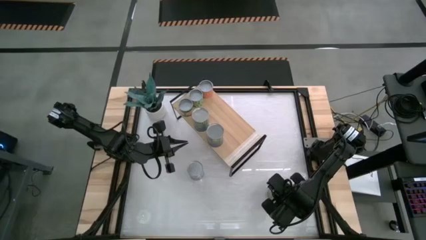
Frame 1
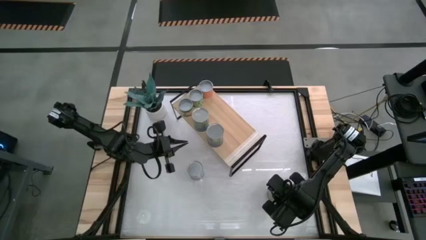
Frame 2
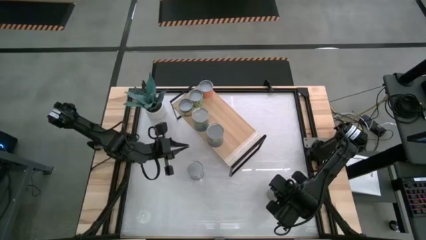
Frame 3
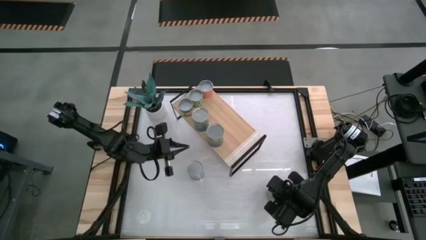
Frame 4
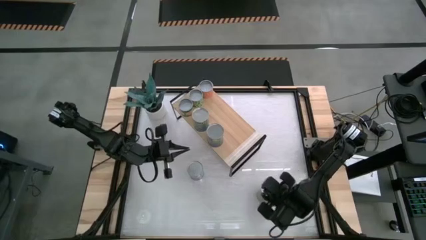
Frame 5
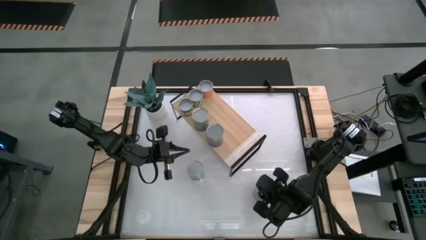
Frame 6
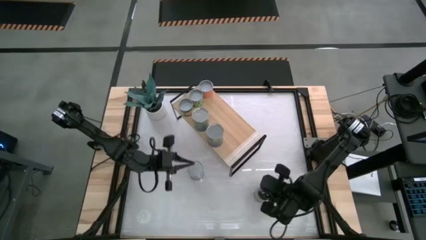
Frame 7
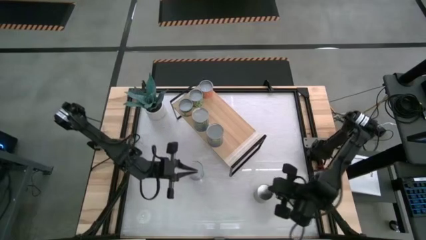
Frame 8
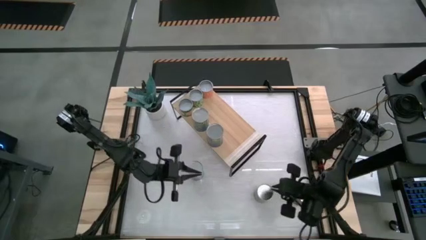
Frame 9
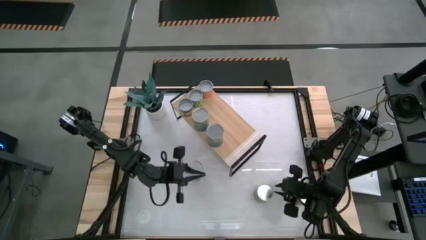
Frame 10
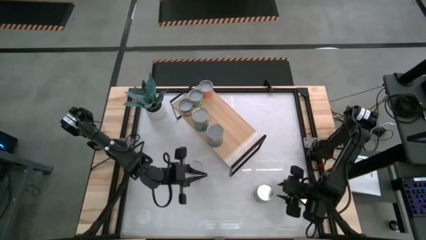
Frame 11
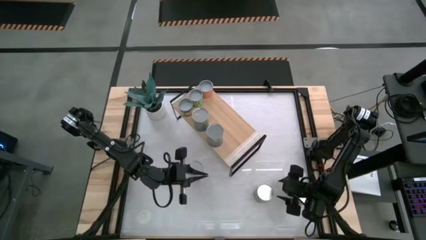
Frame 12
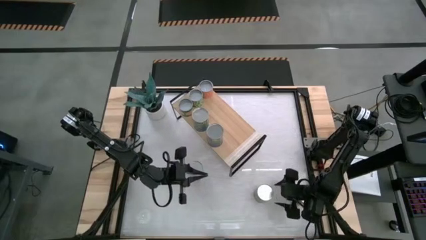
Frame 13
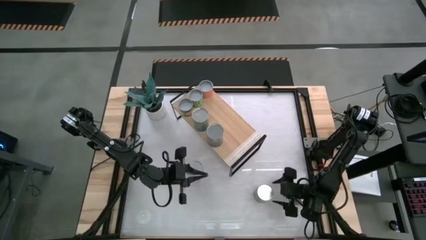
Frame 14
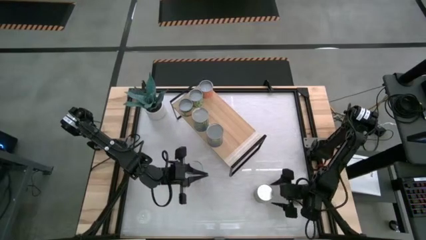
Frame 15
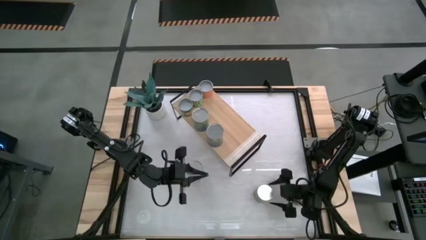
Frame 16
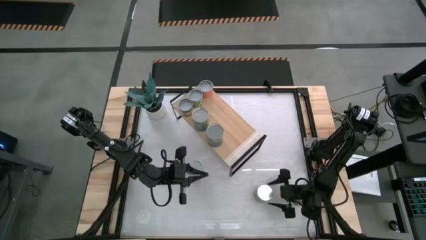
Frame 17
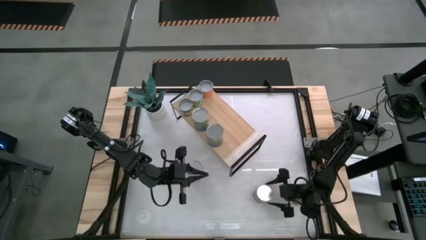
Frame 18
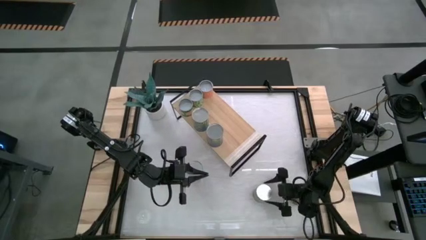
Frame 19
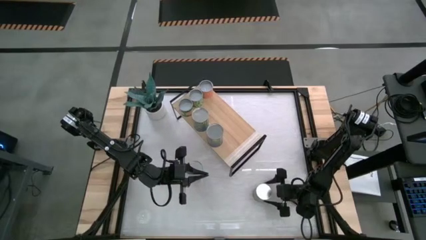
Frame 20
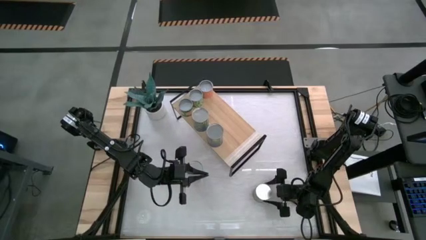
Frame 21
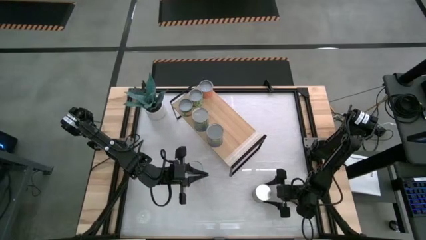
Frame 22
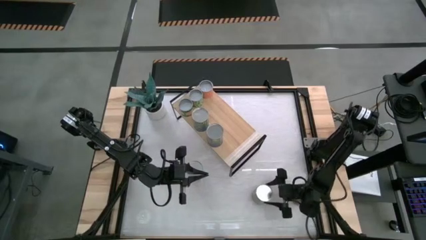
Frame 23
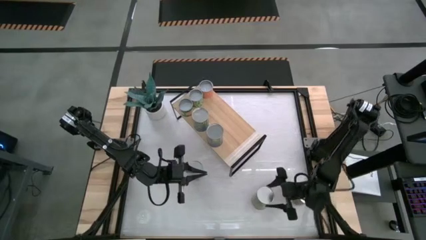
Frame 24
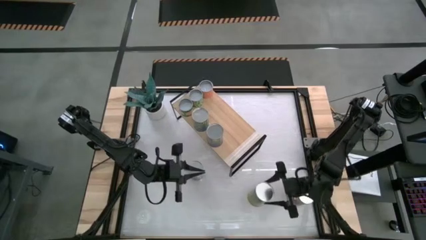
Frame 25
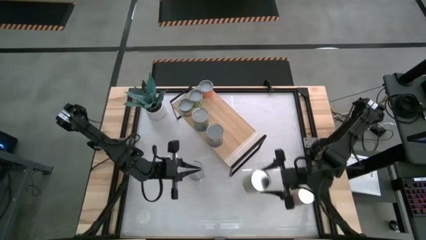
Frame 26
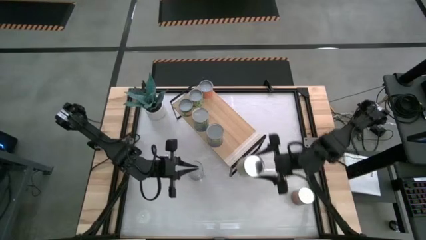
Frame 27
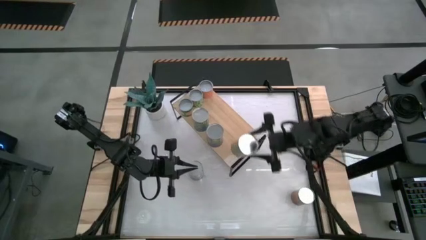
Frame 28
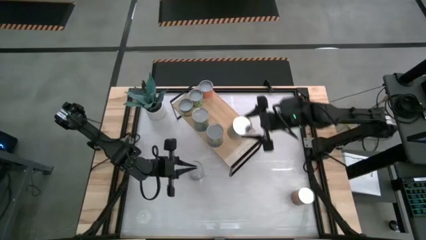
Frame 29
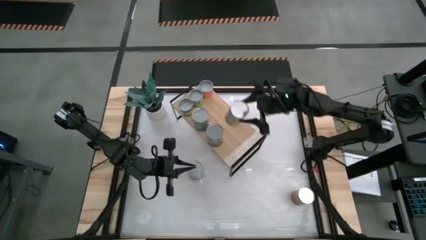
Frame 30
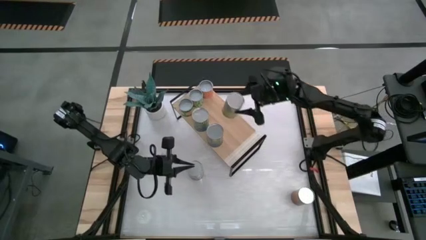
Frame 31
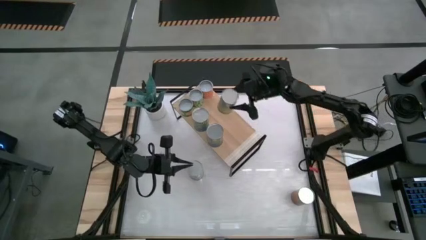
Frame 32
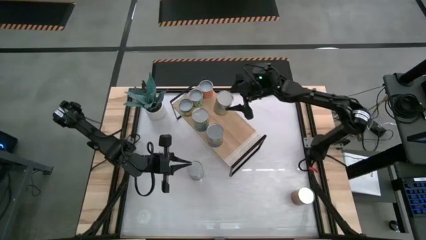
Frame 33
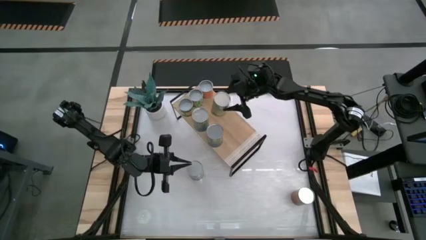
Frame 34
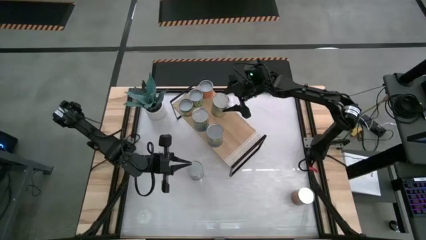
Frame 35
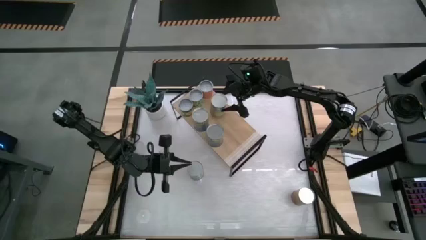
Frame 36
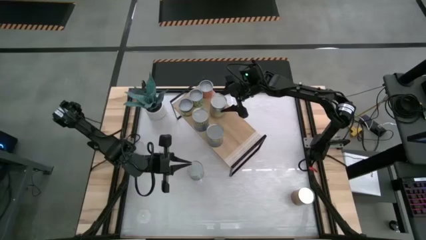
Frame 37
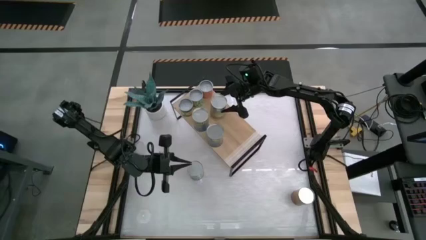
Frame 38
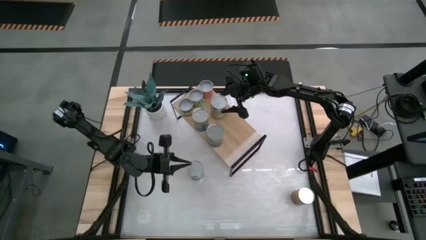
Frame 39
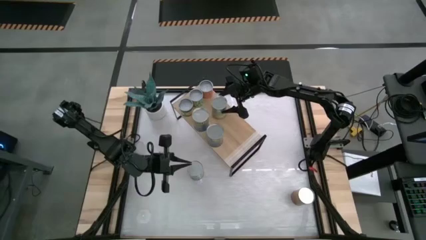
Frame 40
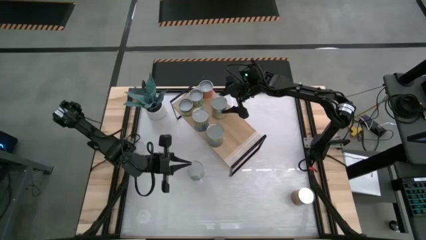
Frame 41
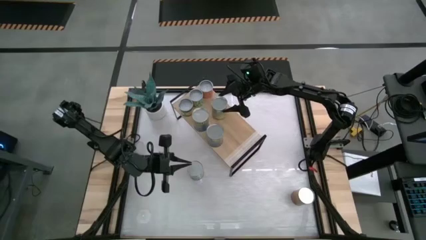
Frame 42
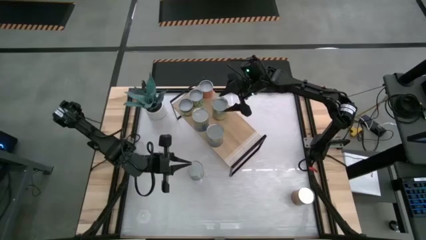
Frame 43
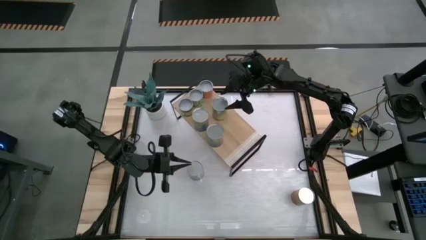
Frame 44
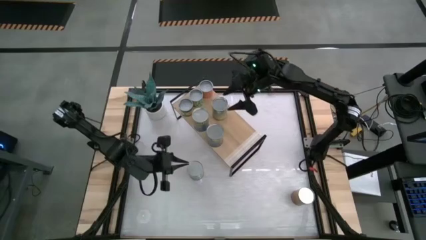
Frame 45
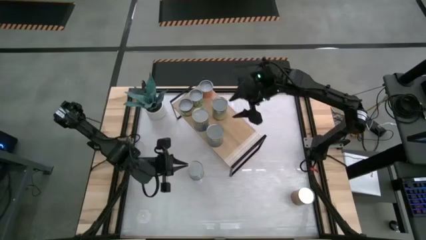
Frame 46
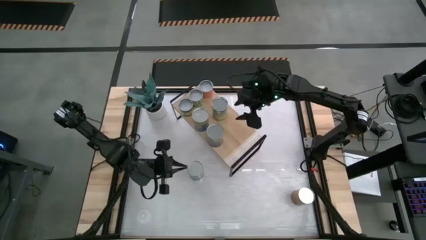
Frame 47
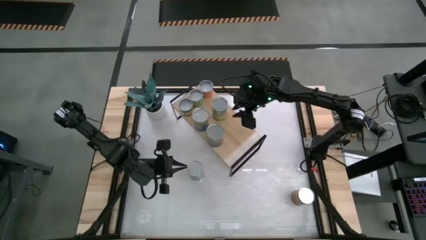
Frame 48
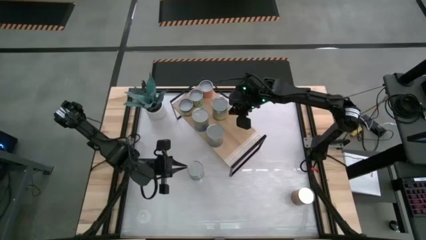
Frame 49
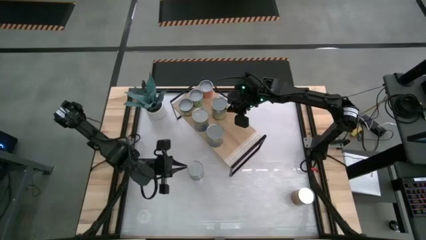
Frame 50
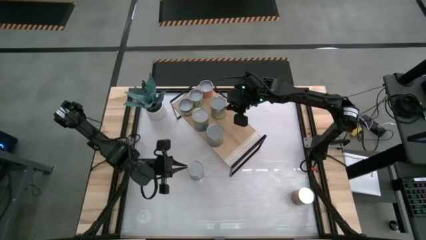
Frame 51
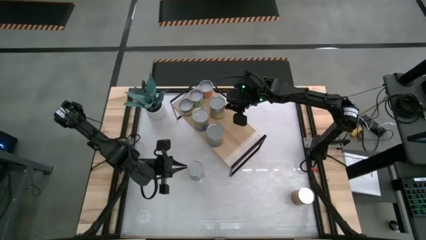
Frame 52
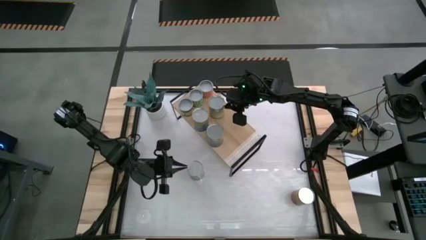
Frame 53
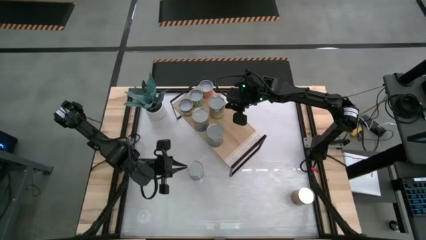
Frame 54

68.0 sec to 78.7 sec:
Task: Pick and place cans onto a shelf
Put the canned carrots on the shelf

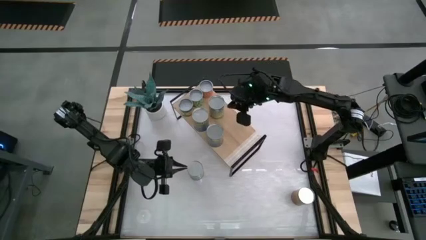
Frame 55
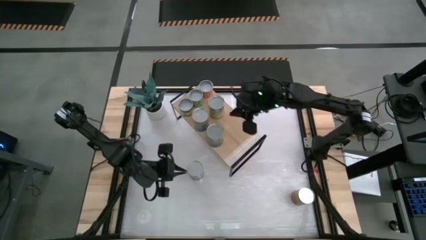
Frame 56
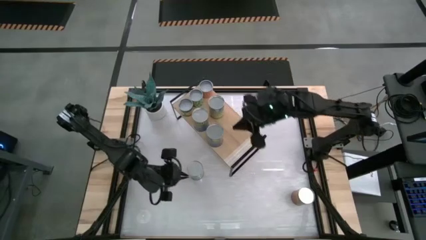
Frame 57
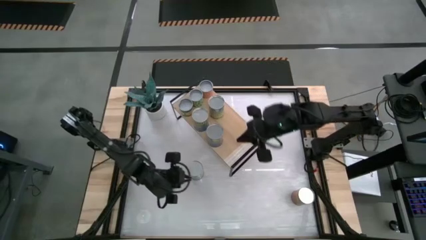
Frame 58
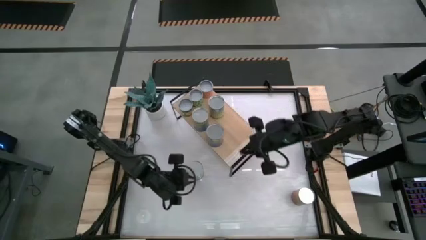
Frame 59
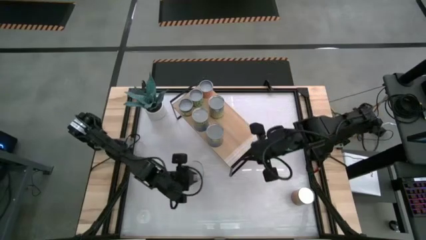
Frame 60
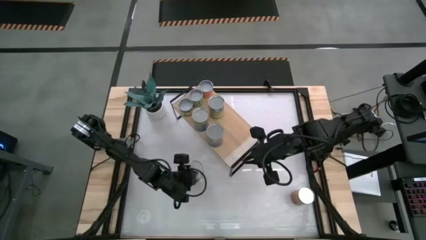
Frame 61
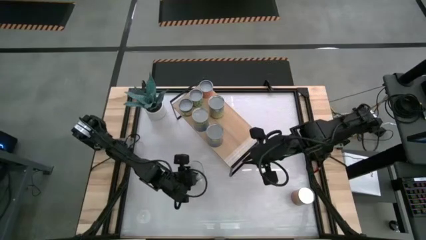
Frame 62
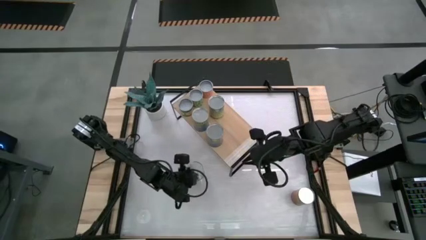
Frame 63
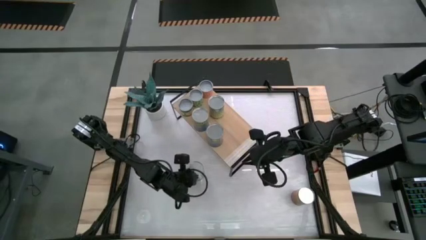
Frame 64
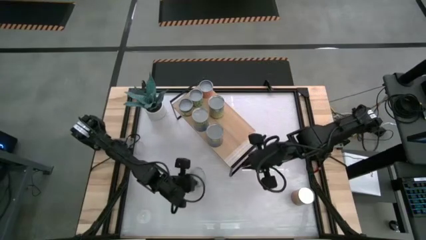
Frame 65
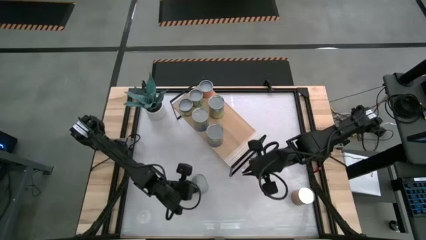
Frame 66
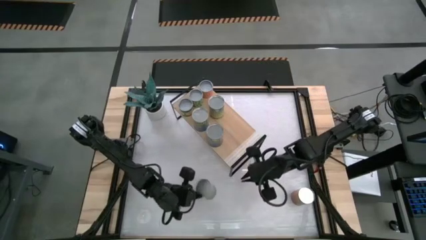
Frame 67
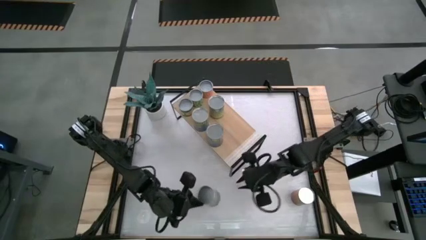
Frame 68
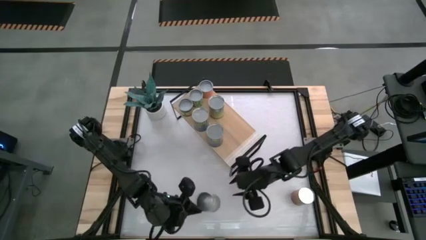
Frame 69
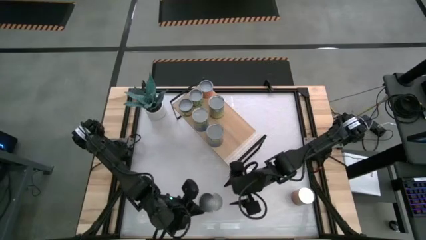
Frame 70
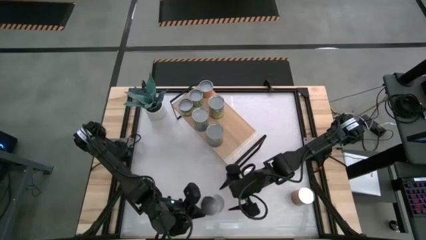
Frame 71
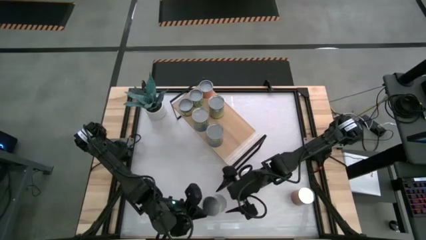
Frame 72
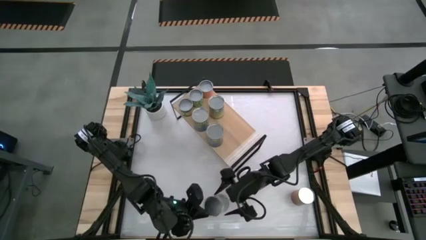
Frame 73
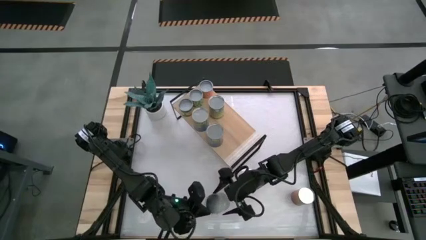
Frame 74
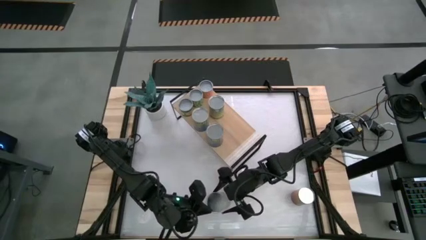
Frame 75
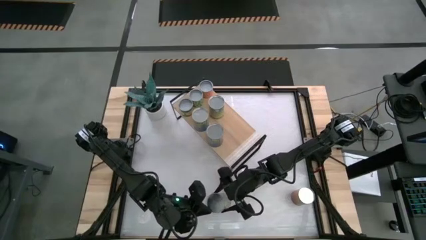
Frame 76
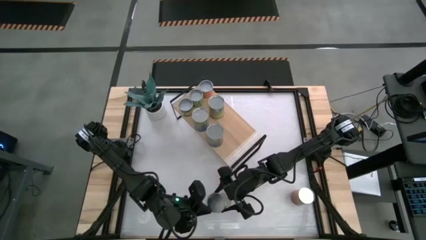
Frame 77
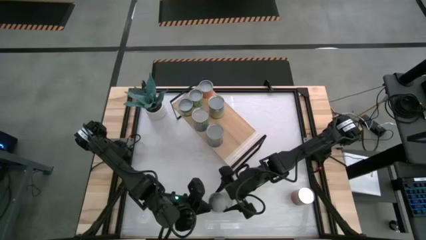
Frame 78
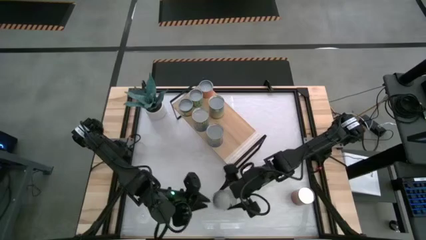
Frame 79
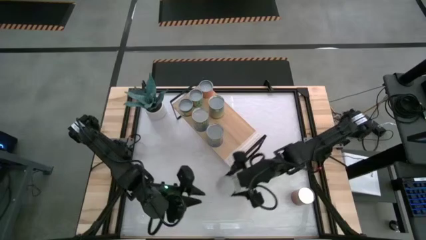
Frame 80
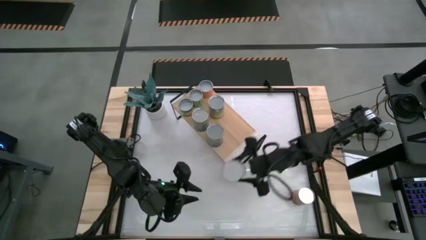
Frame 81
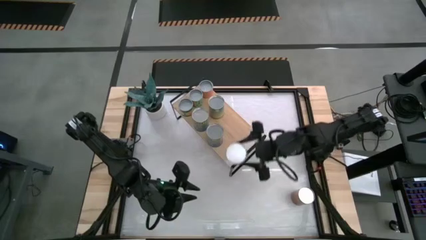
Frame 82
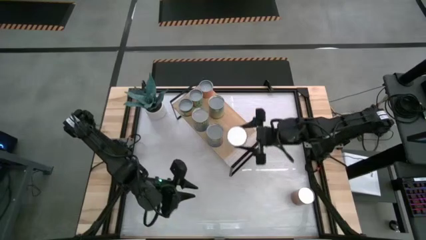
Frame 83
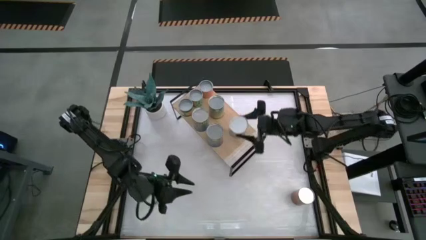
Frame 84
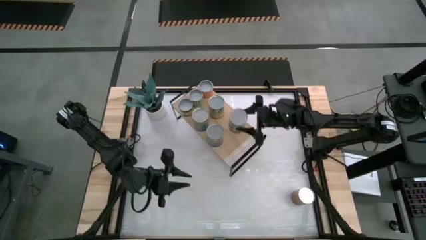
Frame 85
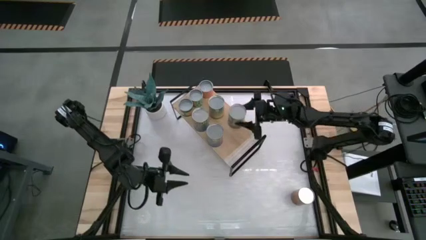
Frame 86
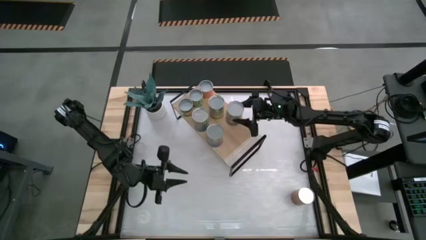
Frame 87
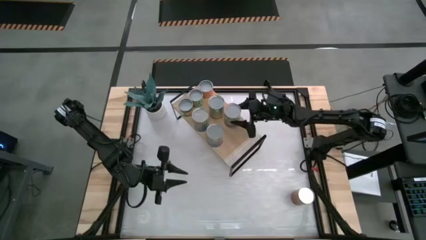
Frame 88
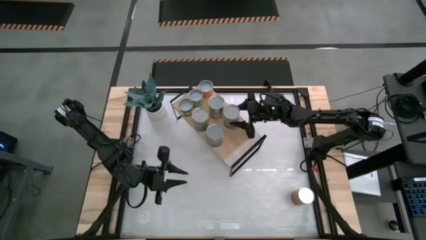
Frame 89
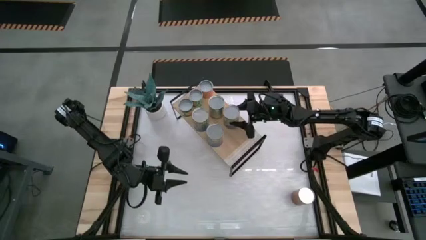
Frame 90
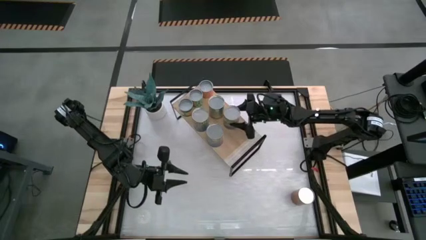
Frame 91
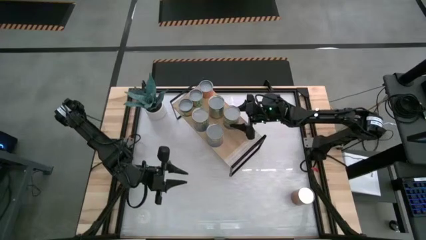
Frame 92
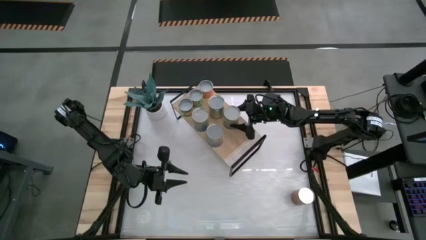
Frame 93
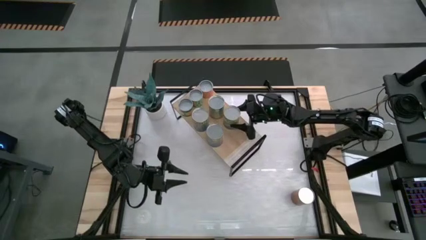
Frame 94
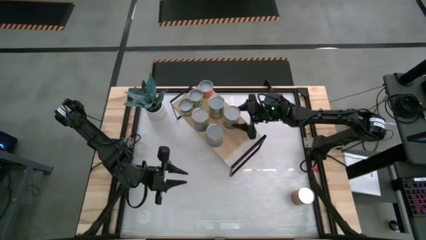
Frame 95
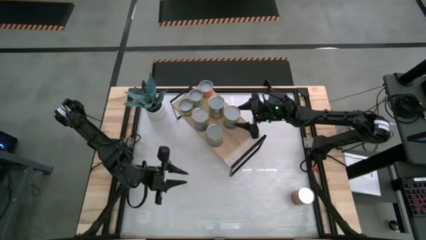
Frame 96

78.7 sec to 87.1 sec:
Put the canned peas on the shelf
